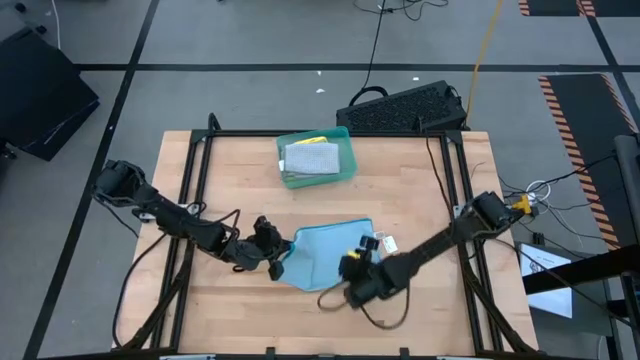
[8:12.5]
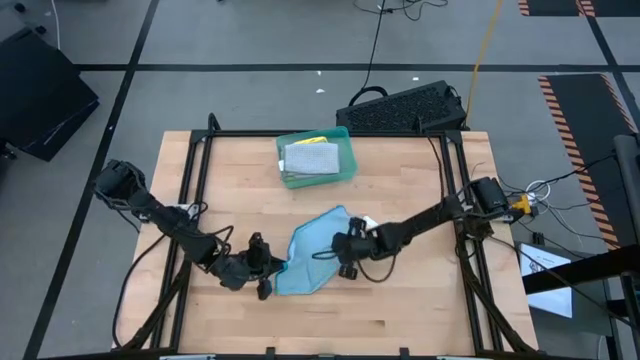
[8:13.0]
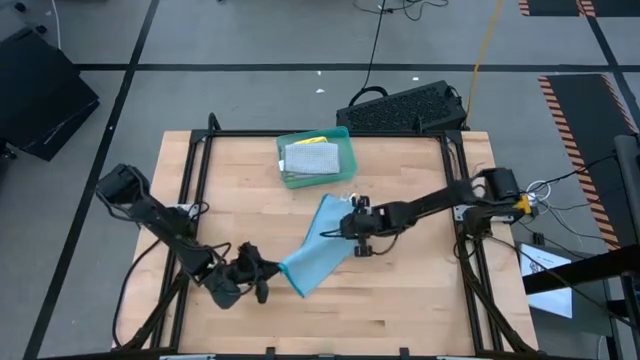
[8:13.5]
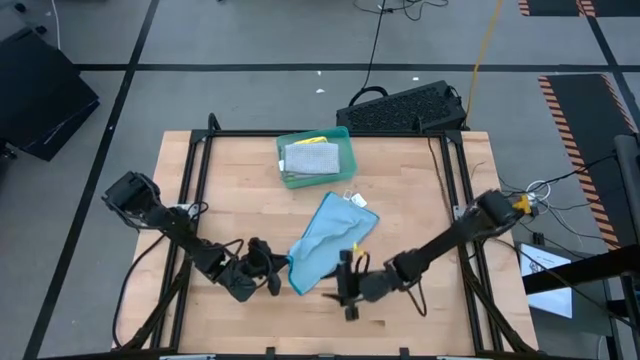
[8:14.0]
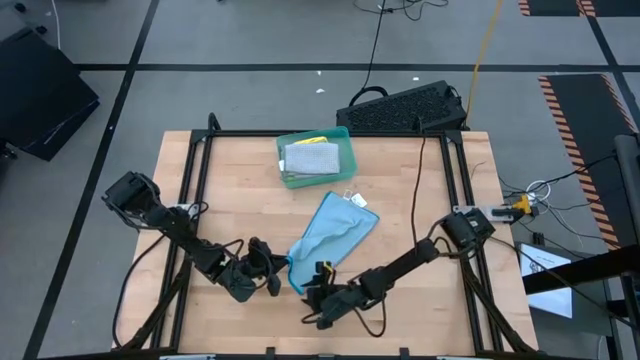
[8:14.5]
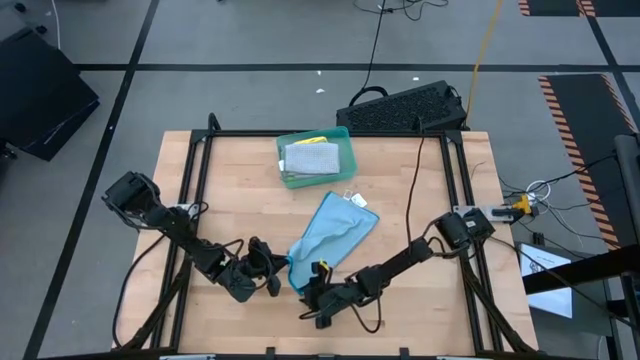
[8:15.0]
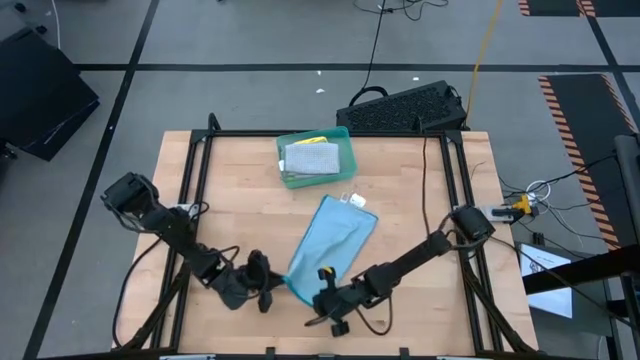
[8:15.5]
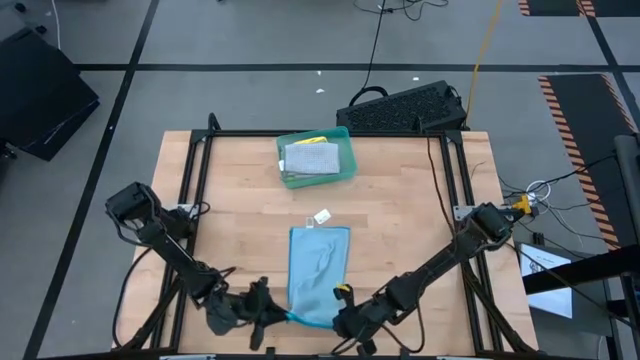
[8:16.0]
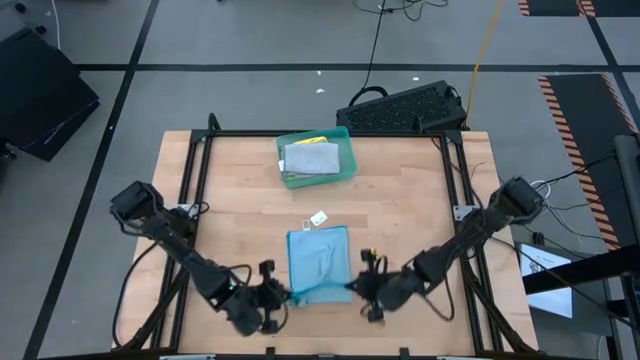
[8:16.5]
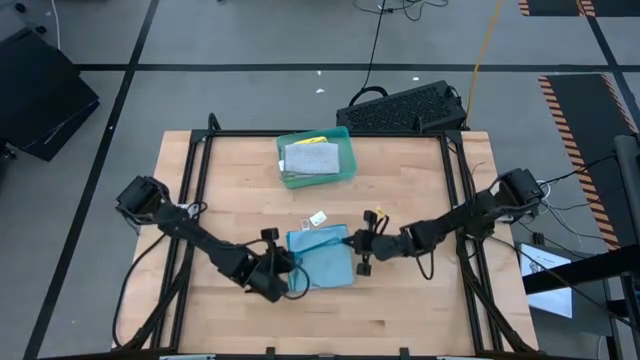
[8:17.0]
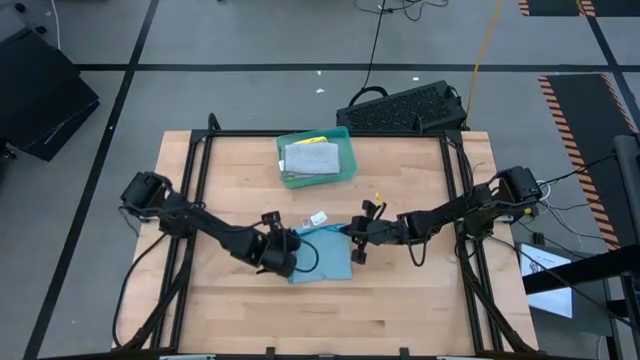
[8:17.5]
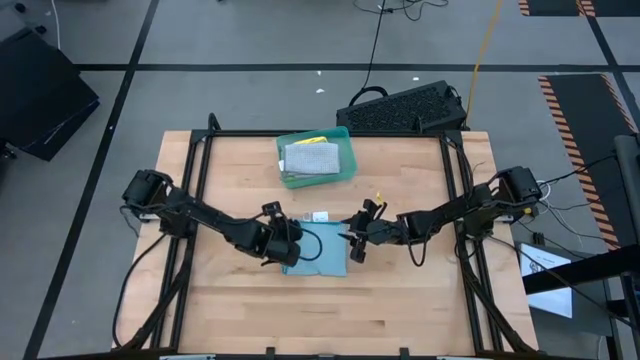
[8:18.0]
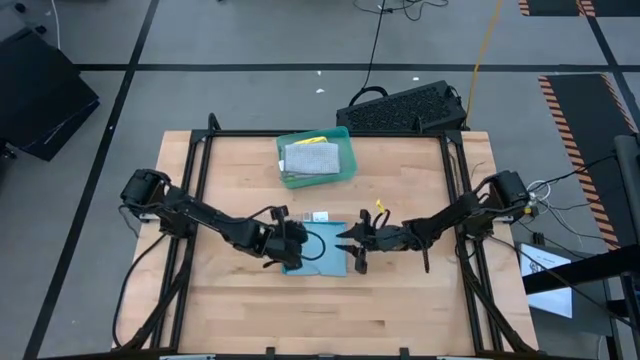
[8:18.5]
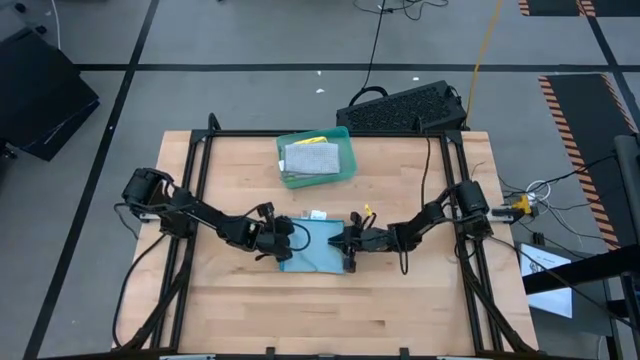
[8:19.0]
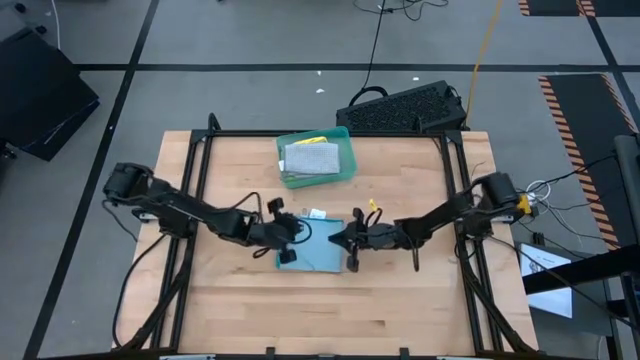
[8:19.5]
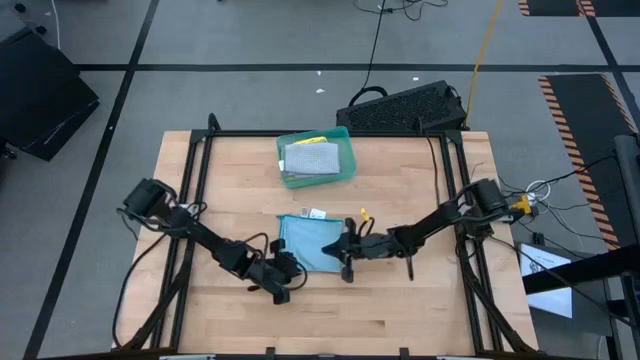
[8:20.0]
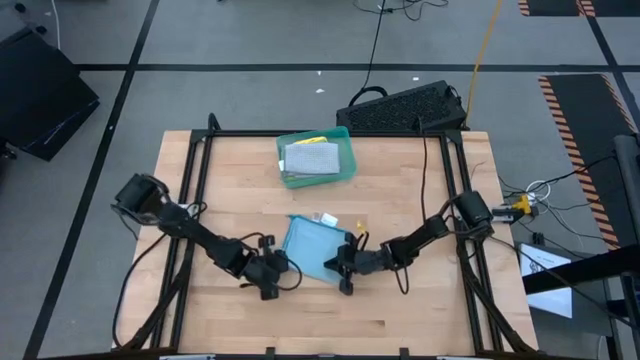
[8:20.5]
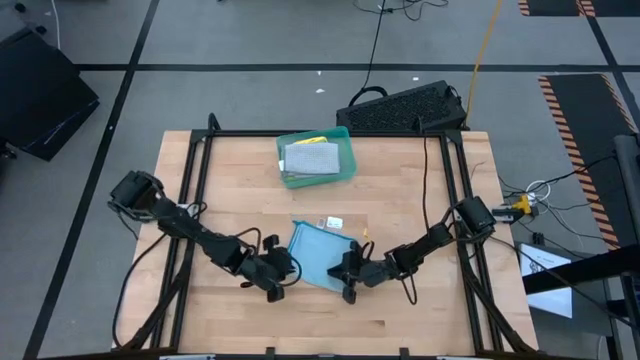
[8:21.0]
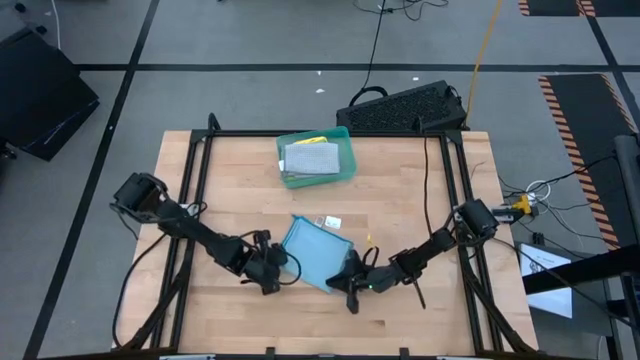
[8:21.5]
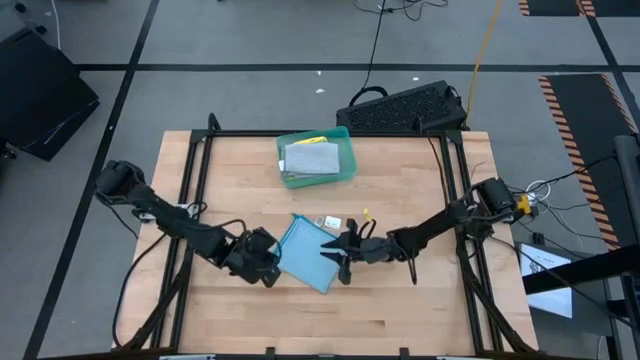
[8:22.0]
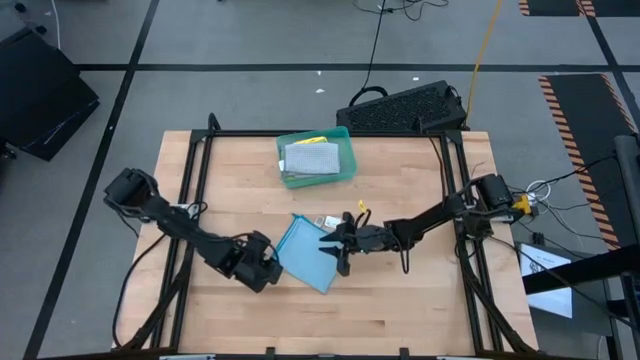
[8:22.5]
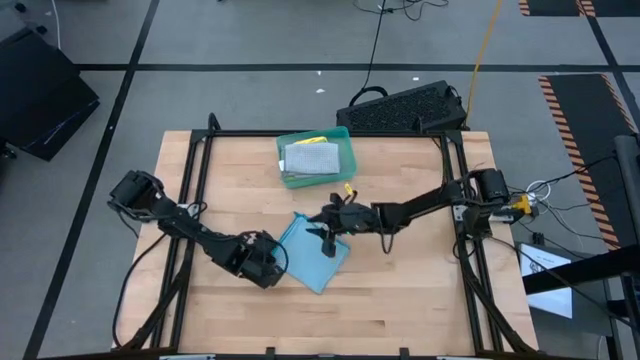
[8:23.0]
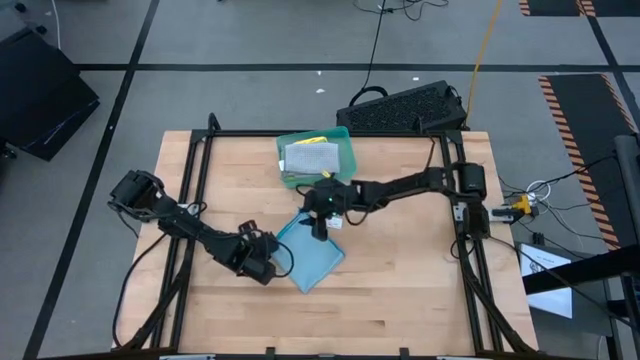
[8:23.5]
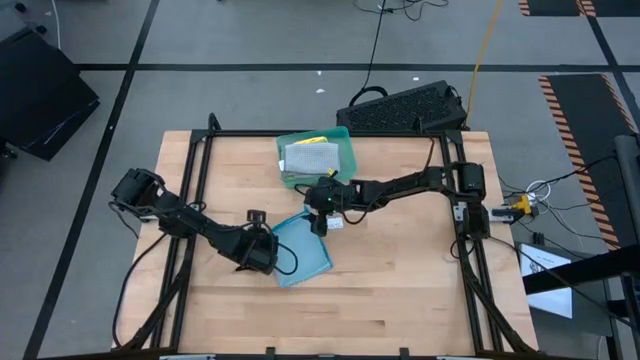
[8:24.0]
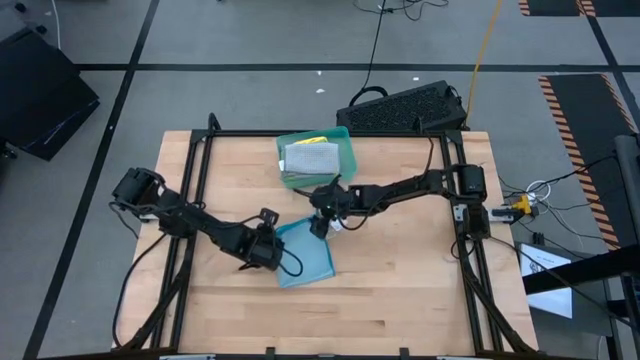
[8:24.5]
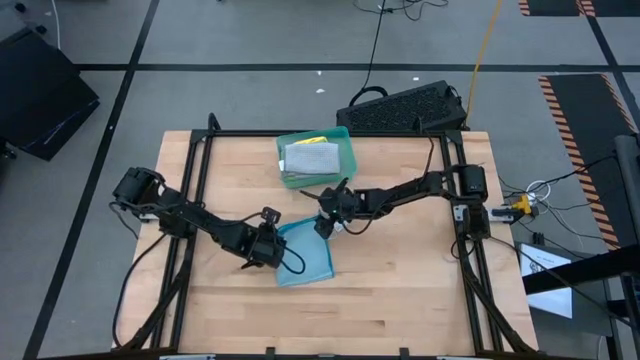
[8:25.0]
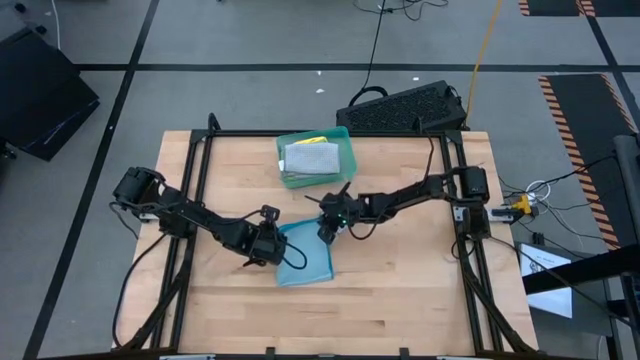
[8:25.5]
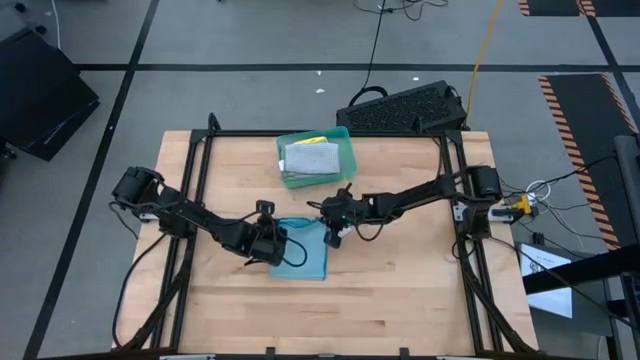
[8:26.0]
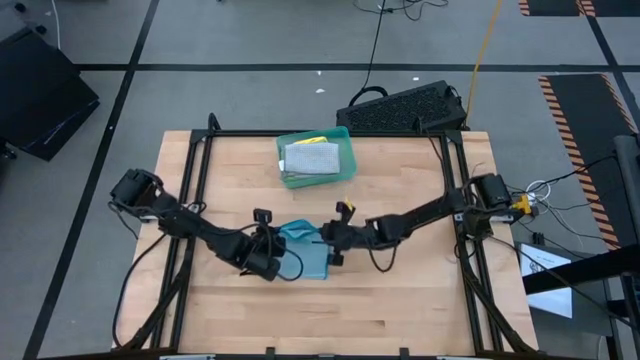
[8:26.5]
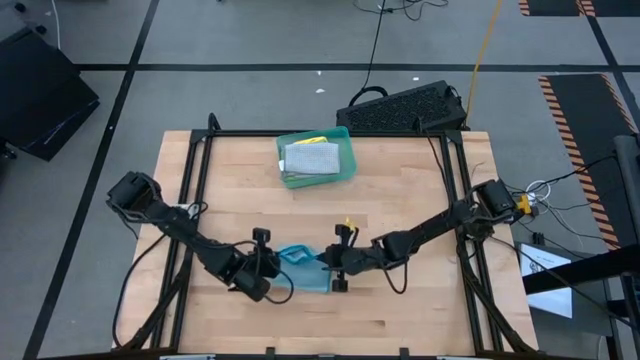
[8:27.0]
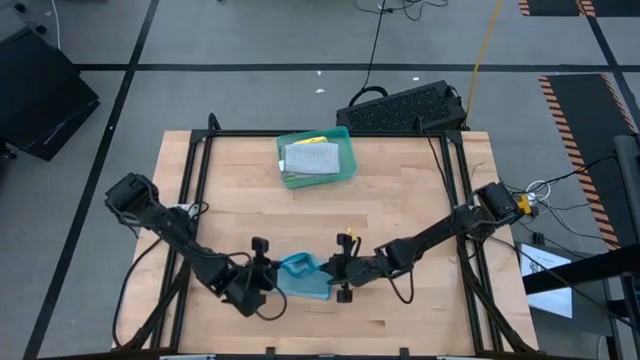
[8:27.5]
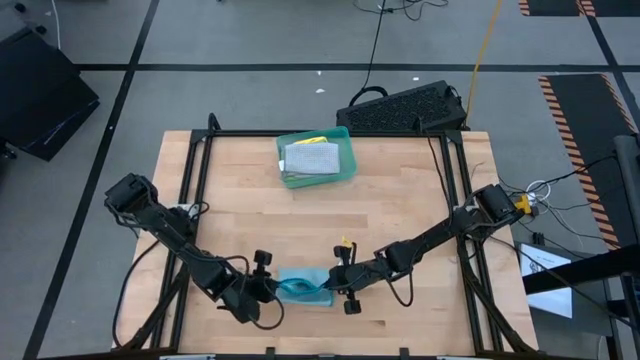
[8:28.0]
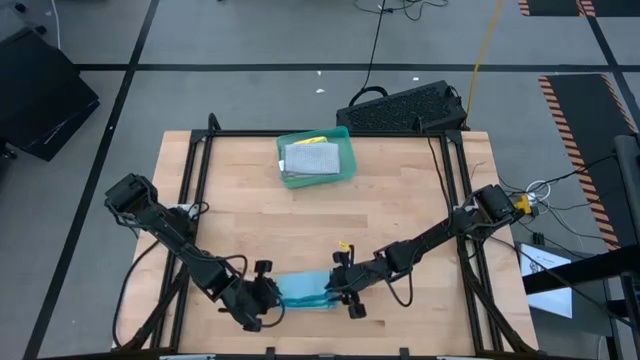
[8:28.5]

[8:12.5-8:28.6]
Task: Fold microfiber towels
Fold the blue microfiber cloth

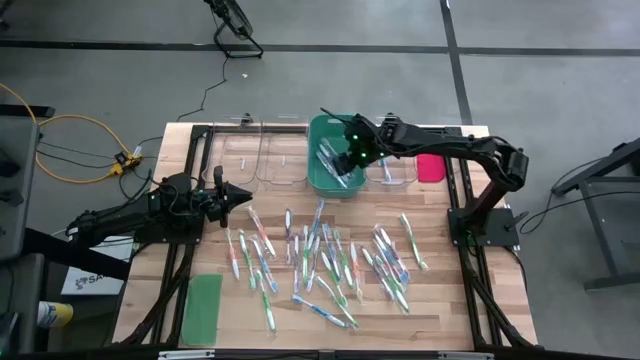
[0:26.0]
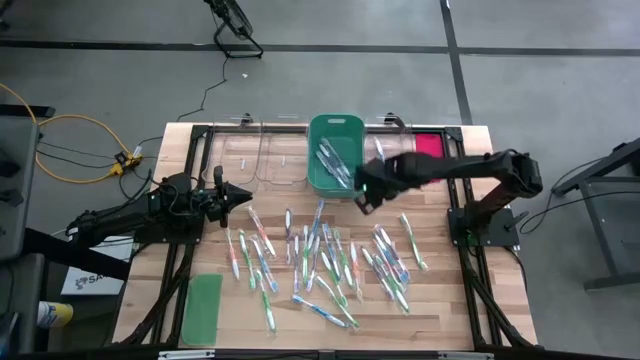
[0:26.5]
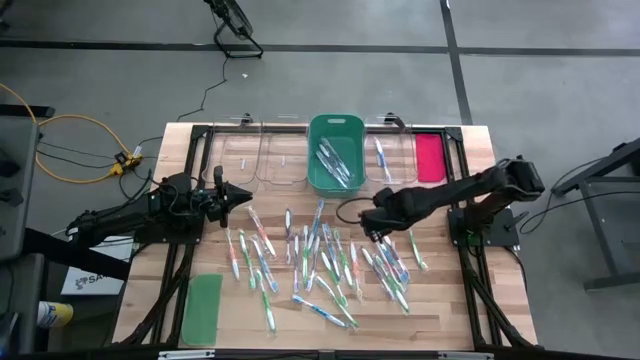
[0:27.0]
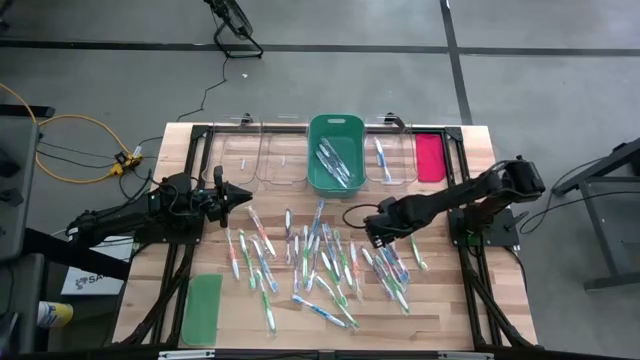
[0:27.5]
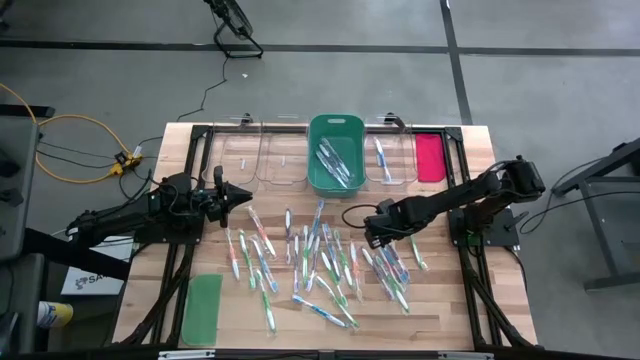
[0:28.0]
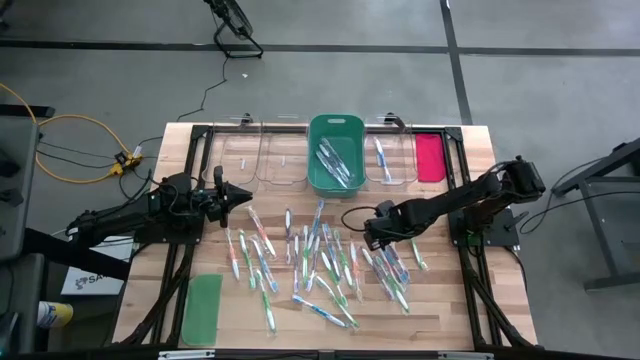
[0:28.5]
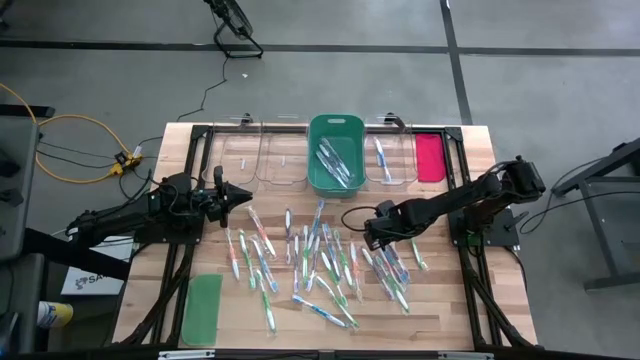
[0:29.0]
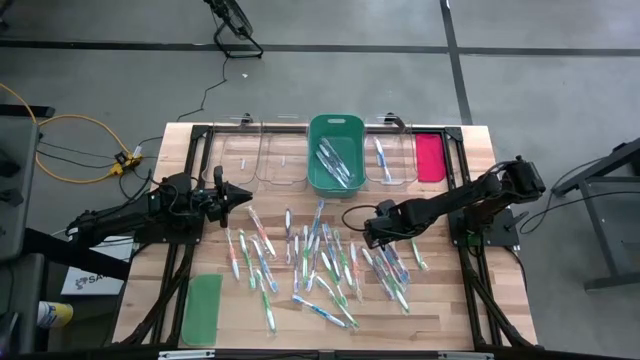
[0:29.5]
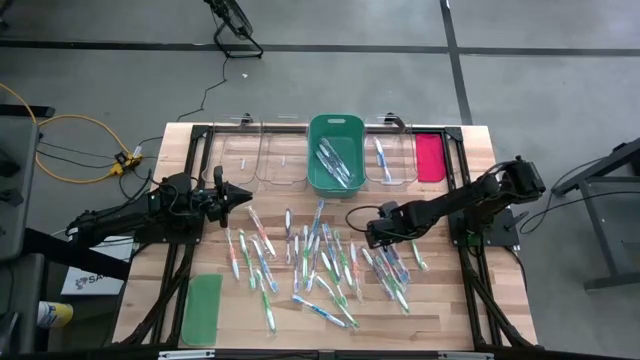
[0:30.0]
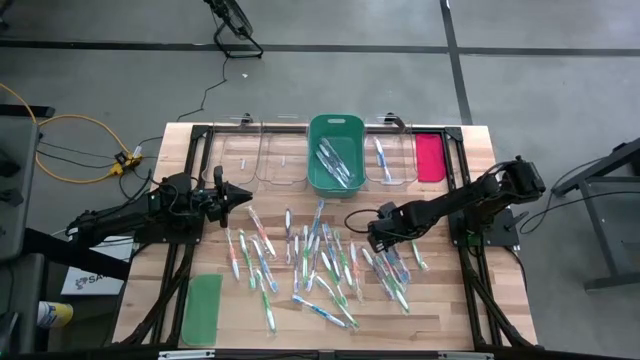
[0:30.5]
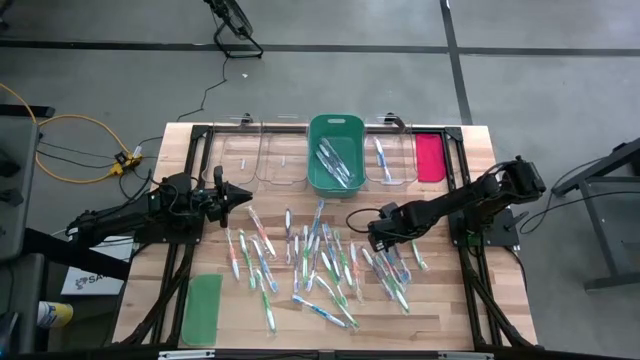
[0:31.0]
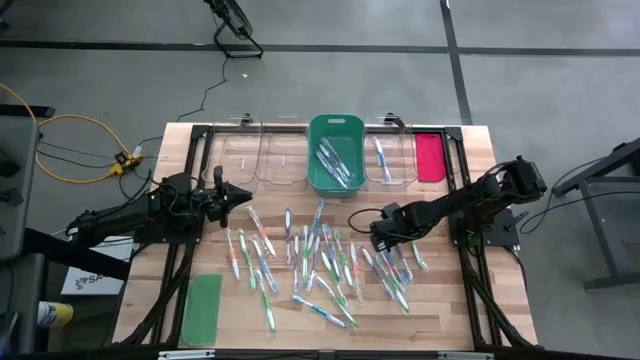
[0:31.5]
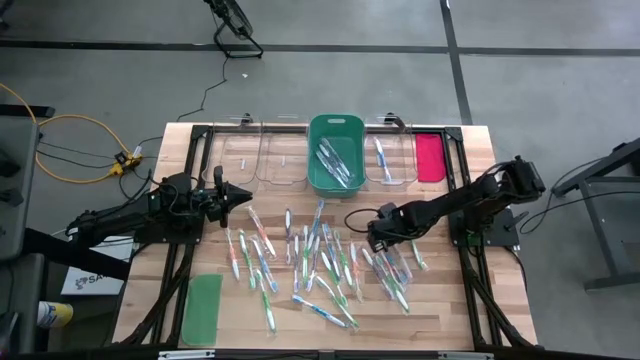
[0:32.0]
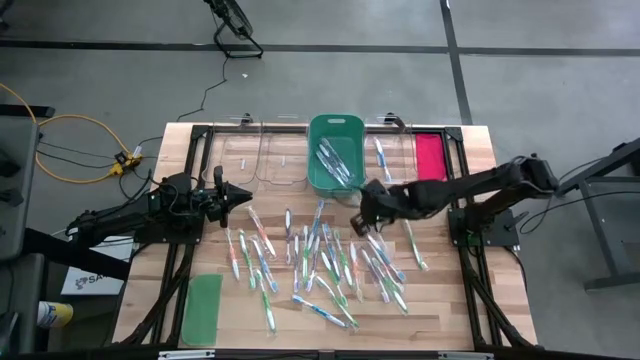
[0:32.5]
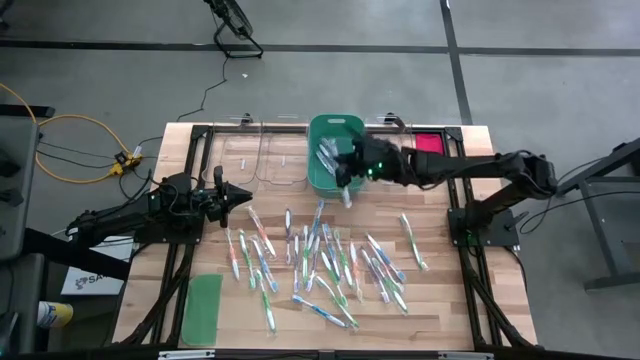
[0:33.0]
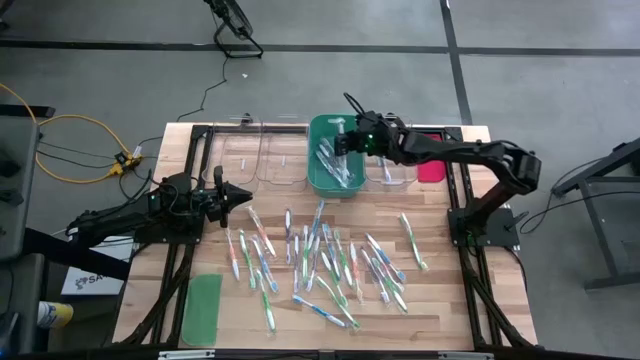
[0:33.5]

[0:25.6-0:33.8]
Task: Pick & Place Toothbrushes
Put the purple toothbrush into the green bin
